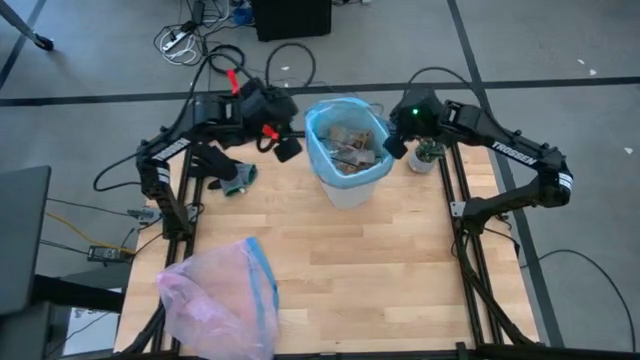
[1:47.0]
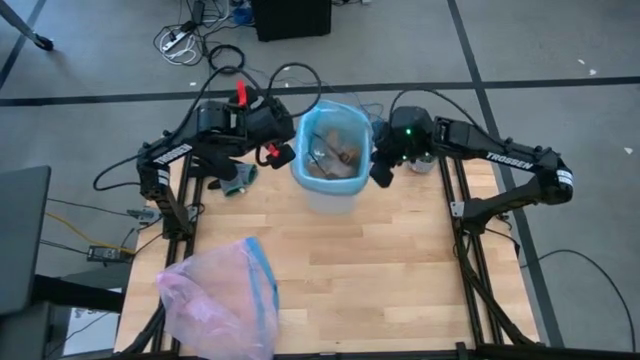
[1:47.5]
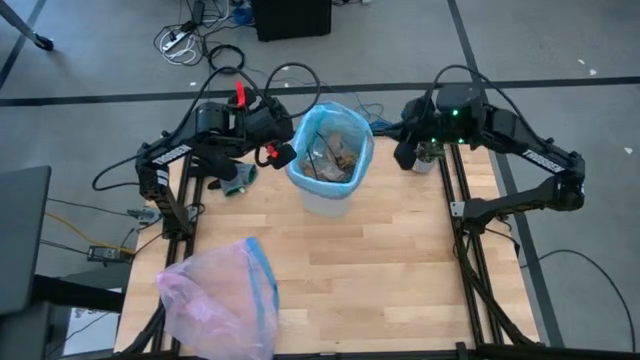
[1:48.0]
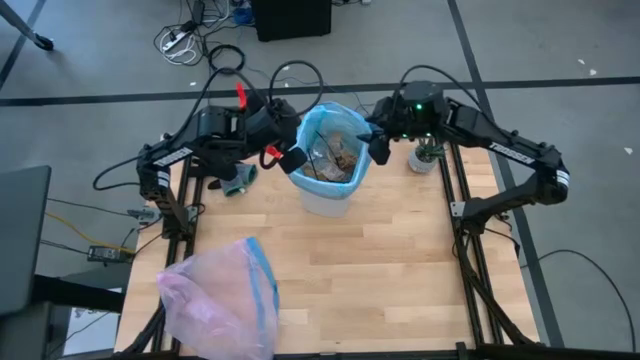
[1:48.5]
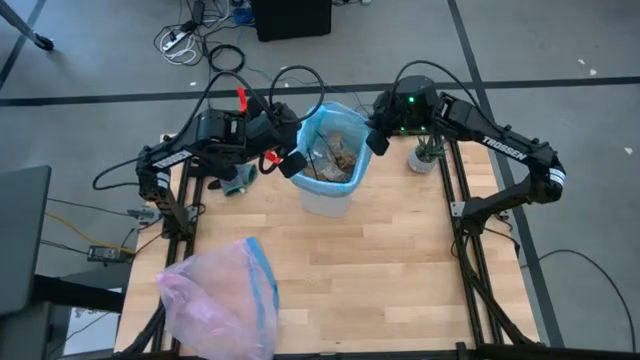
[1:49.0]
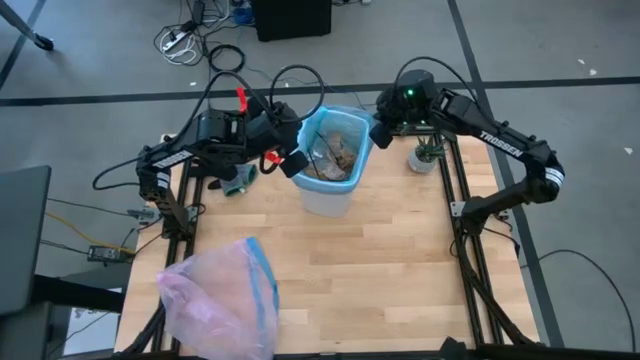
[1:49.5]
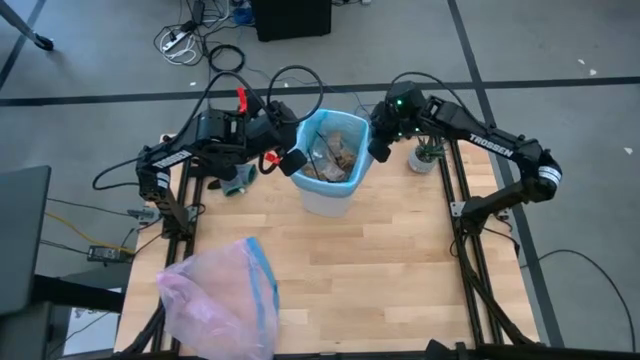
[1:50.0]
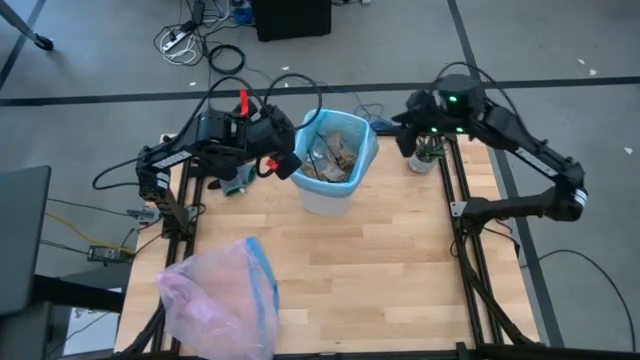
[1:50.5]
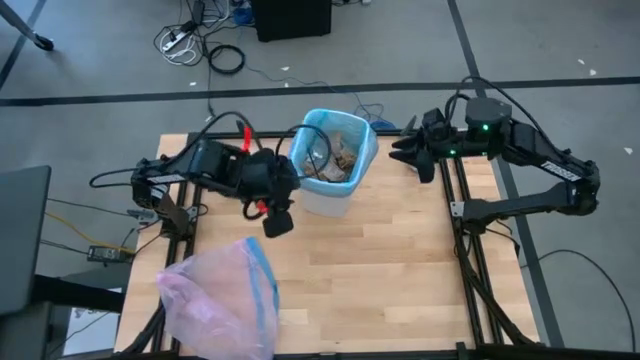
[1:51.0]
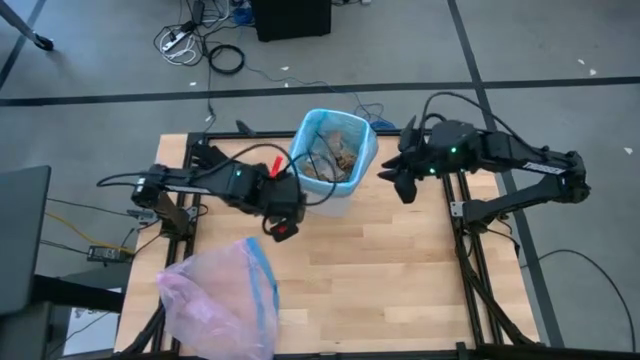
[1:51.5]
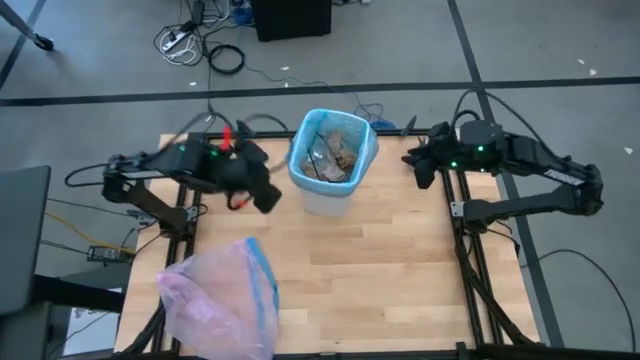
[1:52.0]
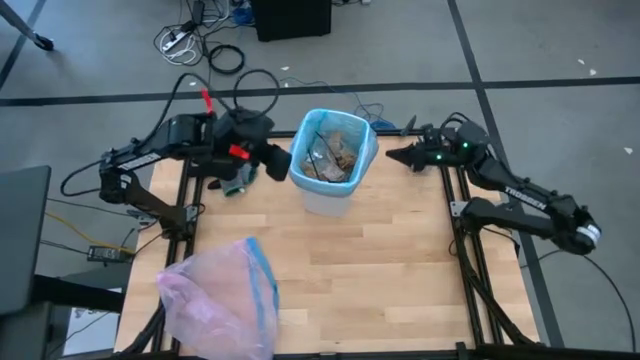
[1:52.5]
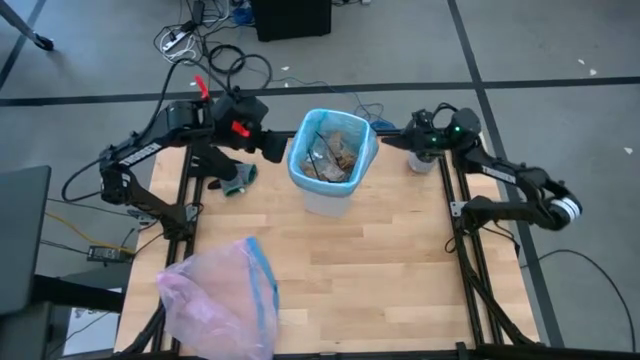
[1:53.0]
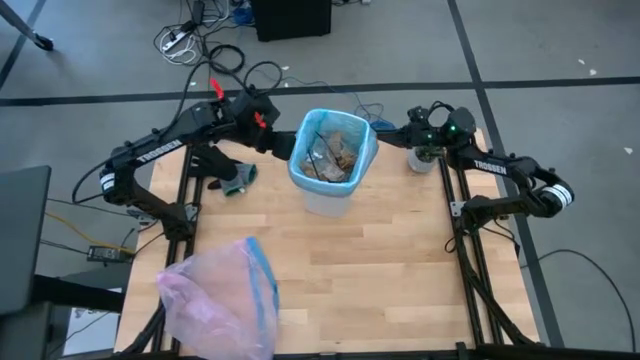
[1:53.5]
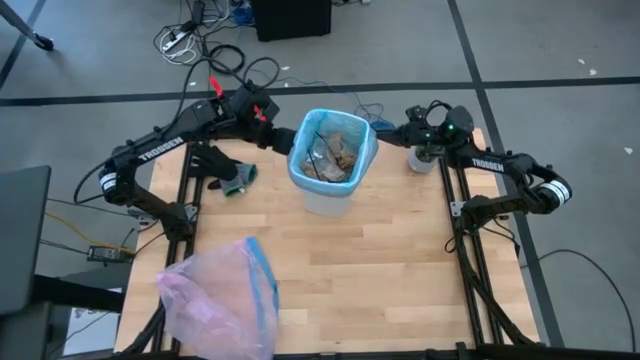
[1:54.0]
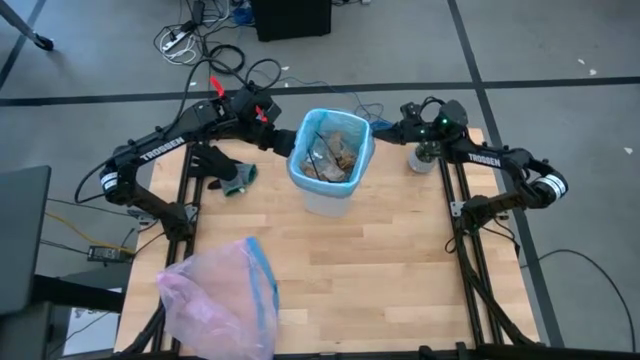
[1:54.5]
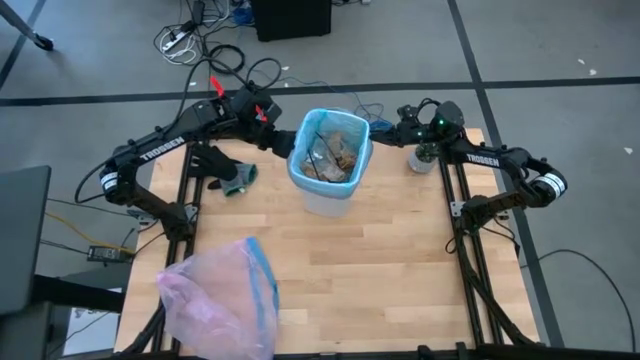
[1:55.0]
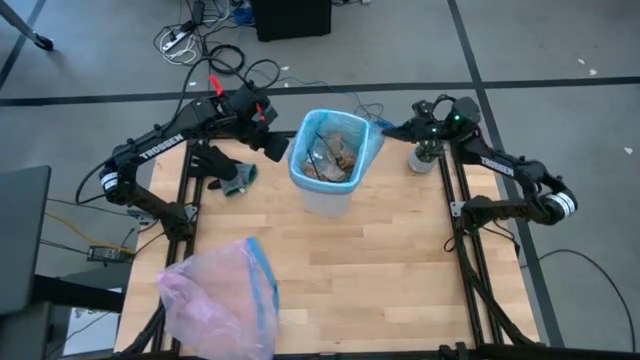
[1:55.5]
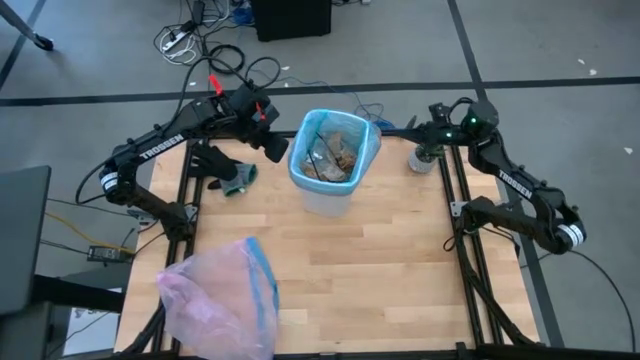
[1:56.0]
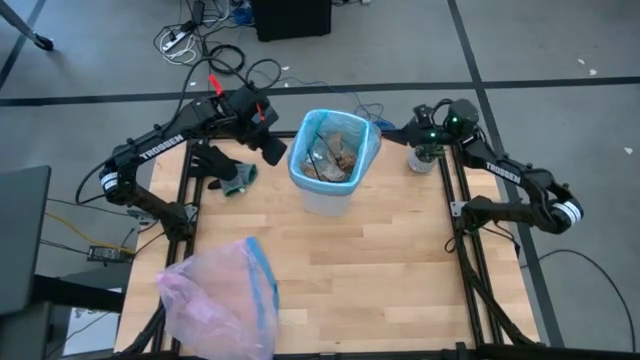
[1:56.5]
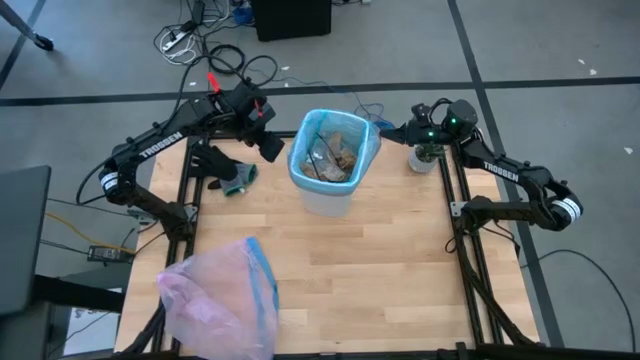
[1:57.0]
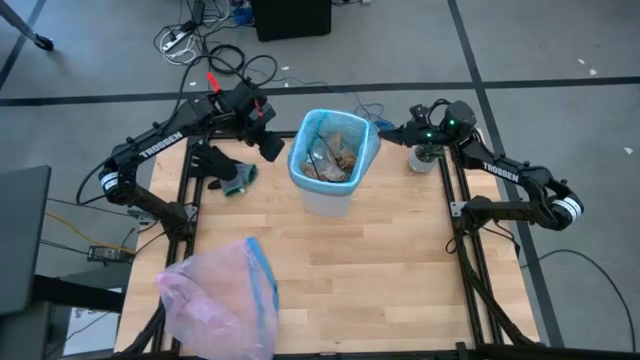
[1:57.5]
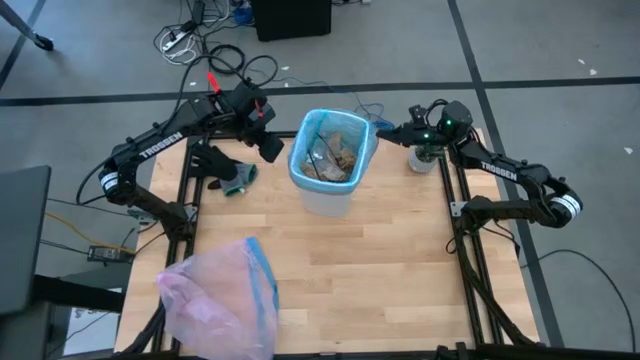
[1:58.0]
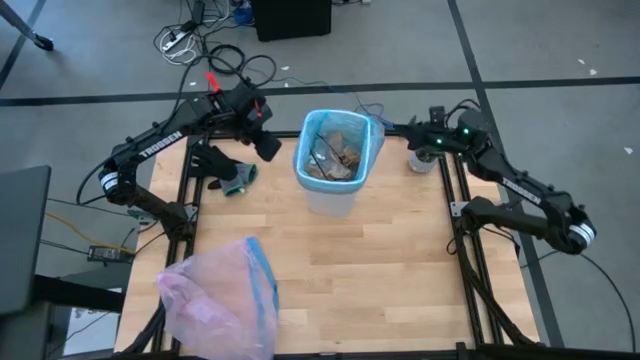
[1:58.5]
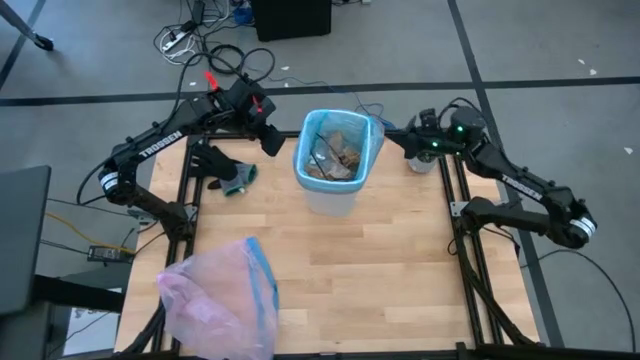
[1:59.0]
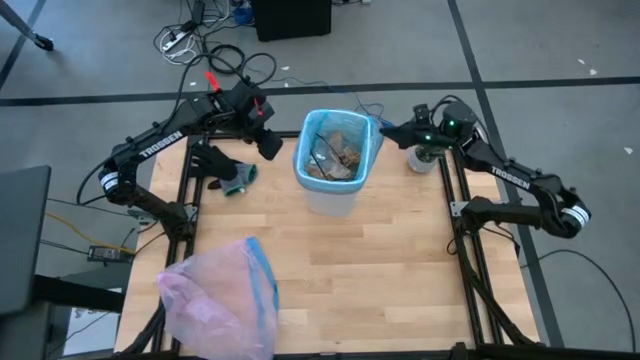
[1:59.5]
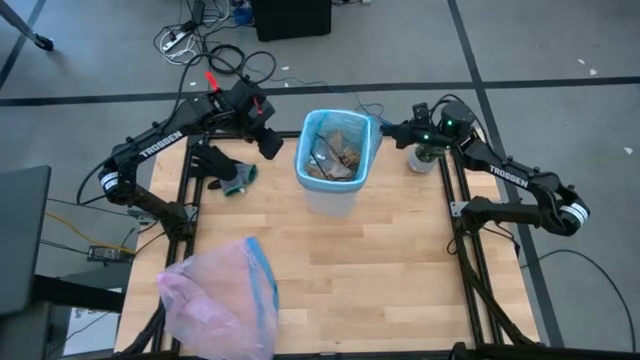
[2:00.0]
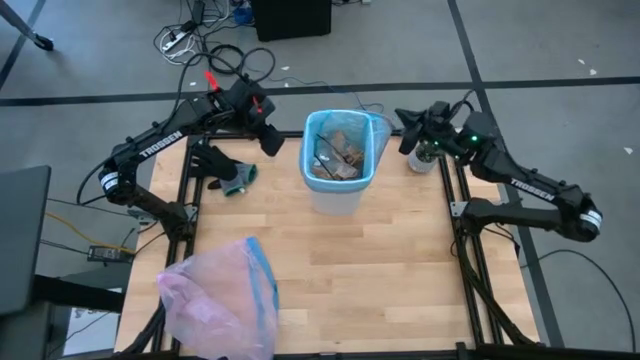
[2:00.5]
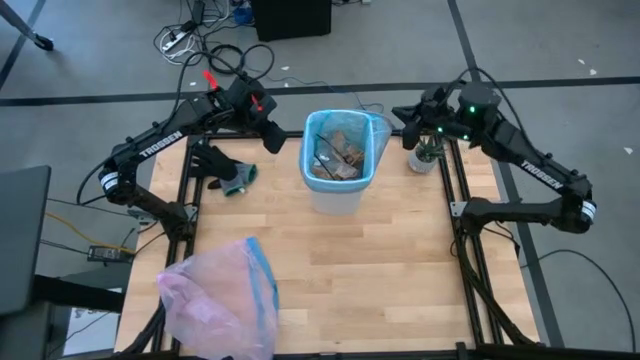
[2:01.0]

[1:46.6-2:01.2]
Task: place trash/remove bag and relplace
Remove the trash bag from the trash bin

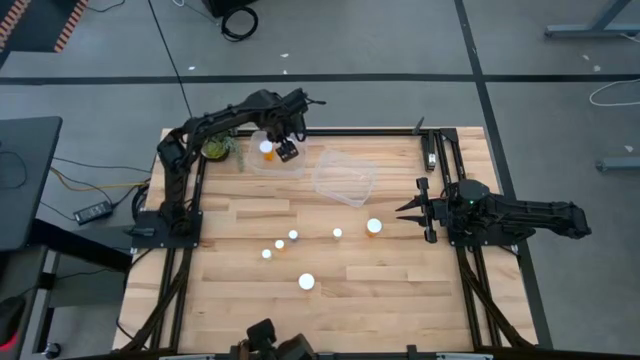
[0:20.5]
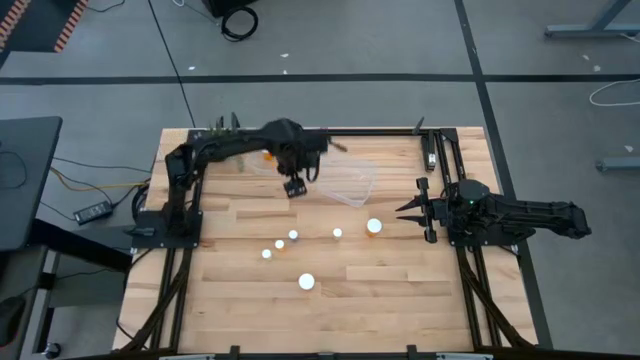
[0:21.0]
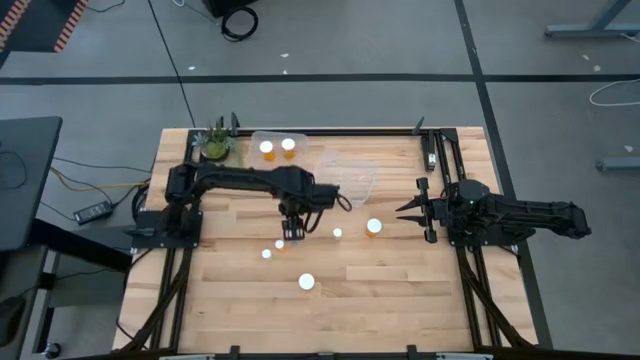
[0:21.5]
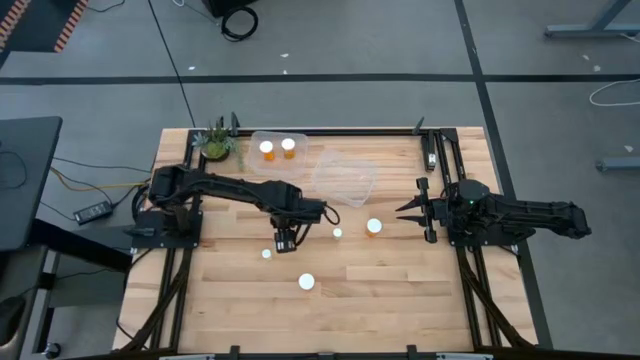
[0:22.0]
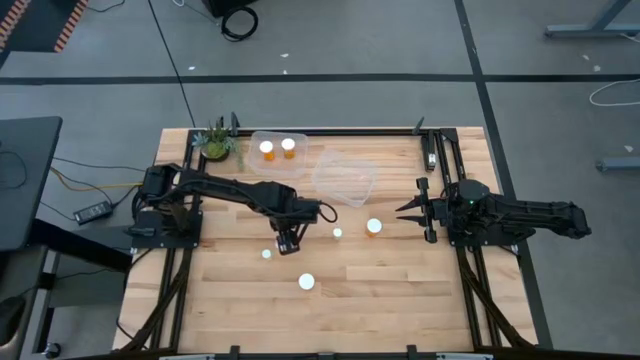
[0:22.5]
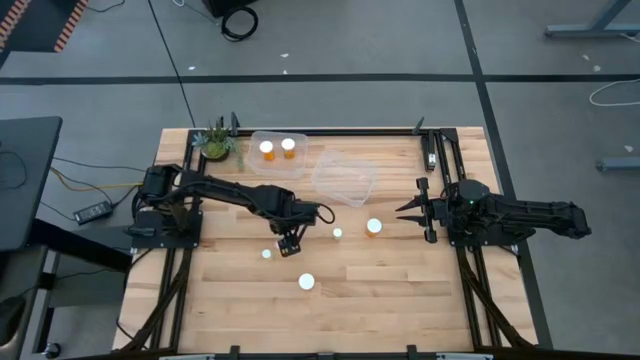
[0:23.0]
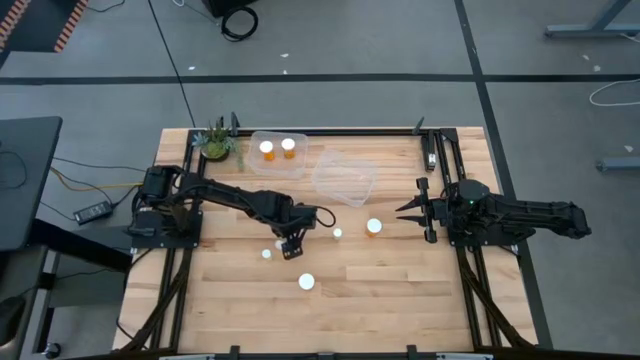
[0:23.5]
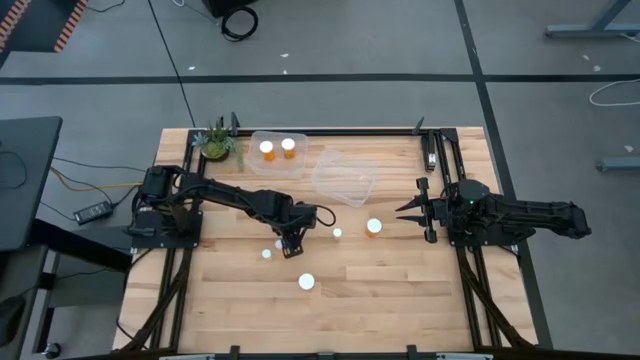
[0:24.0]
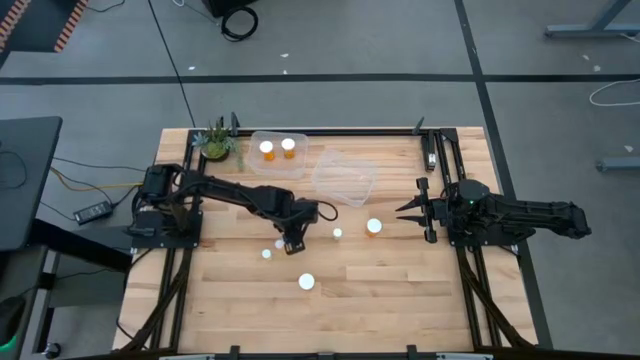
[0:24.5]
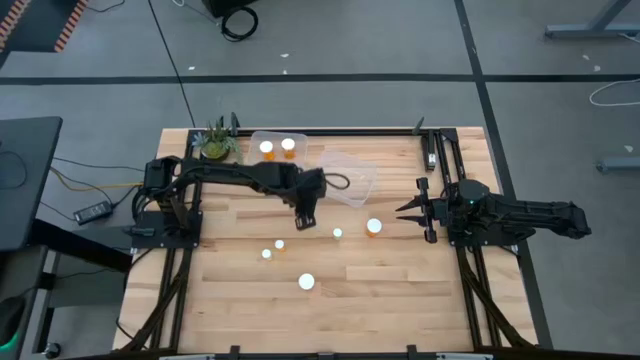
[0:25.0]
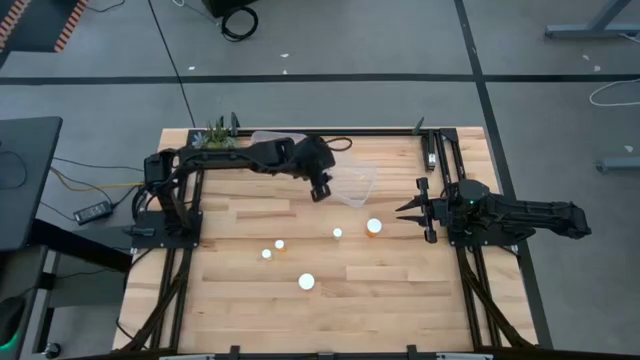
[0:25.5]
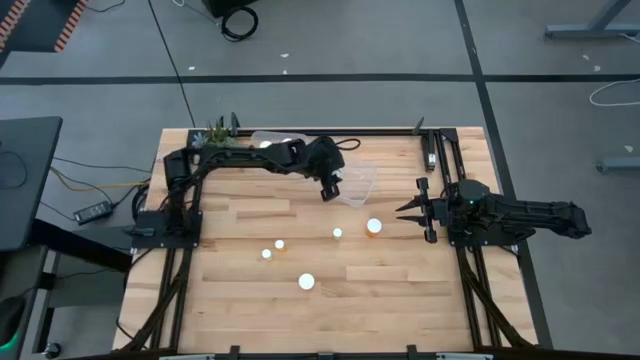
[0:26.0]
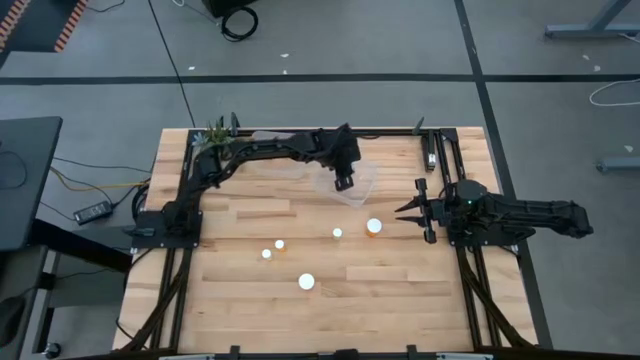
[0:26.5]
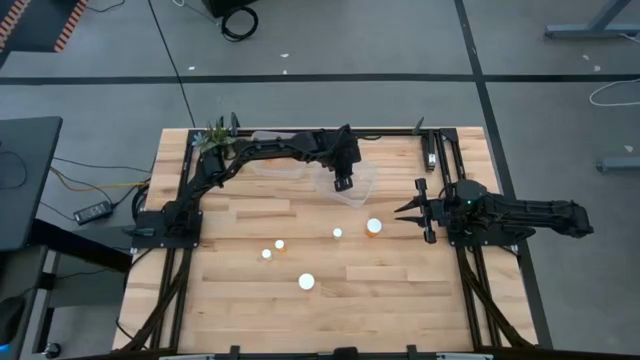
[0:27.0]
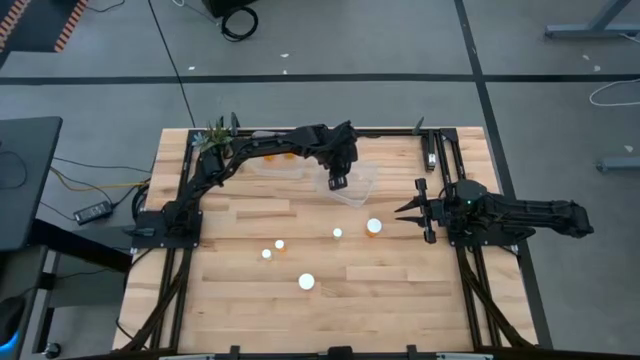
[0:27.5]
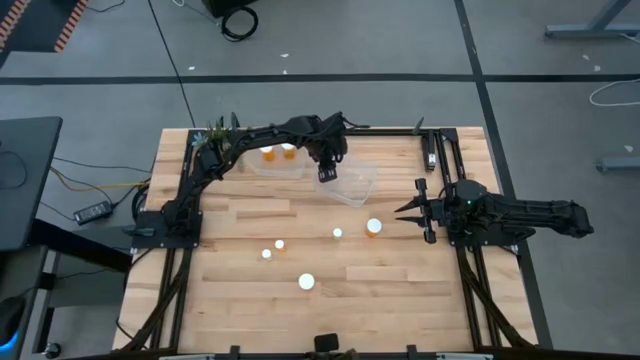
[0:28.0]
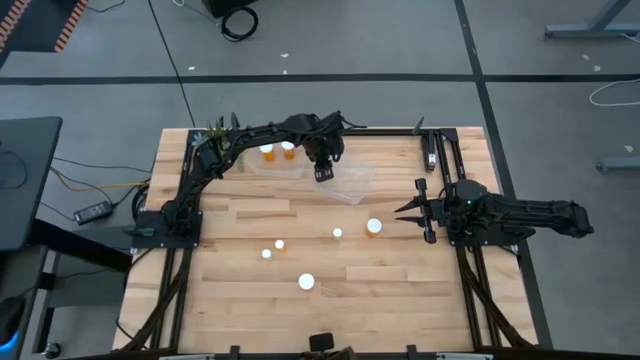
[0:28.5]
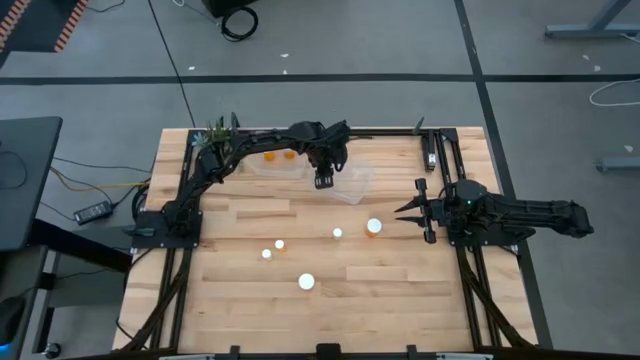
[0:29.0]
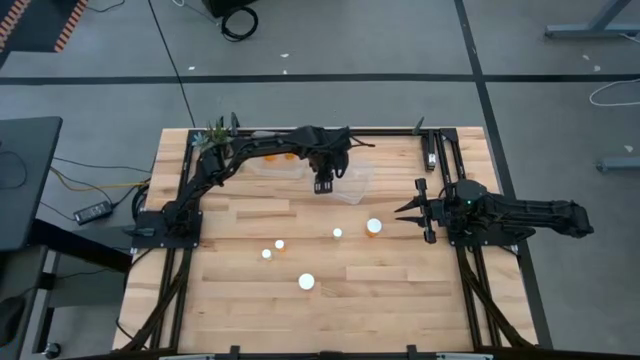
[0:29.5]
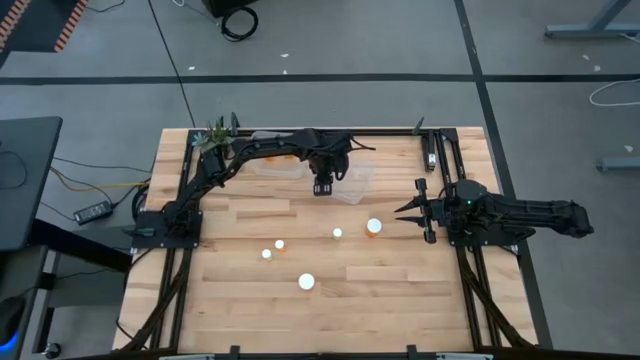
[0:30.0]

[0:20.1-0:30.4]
Task: Pick and place medicine bottles into bin by pill shape (circle, oval)
Put the blue pill bottle into the right transparent bin
